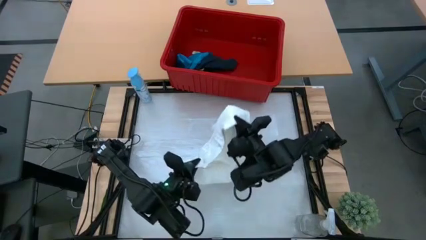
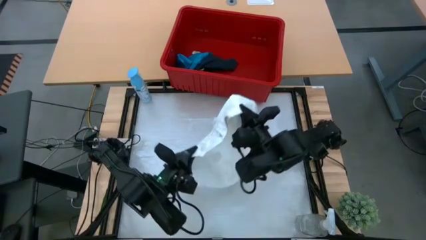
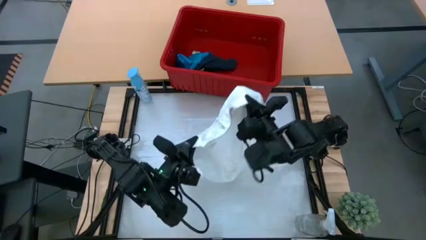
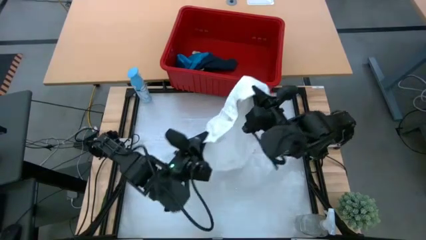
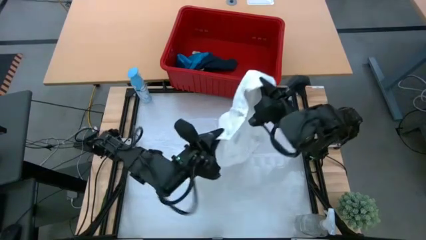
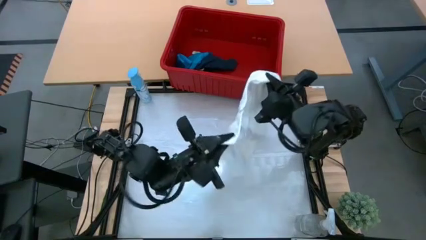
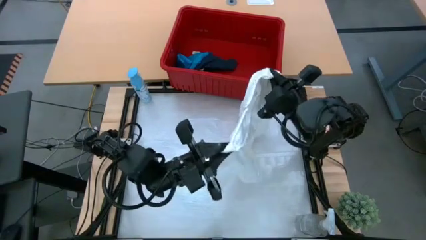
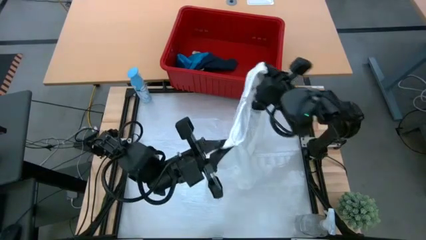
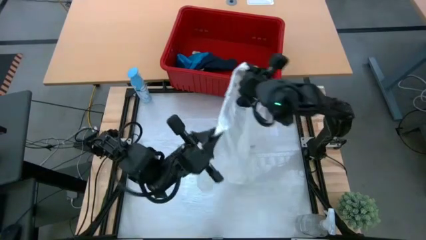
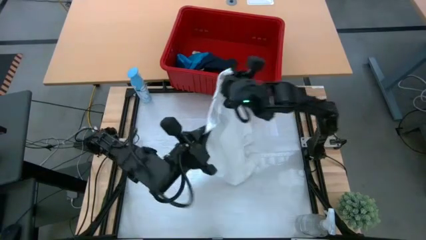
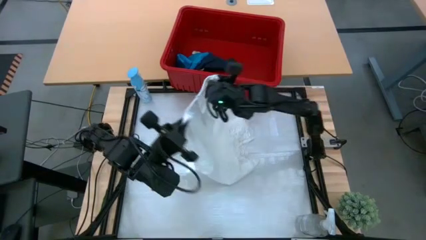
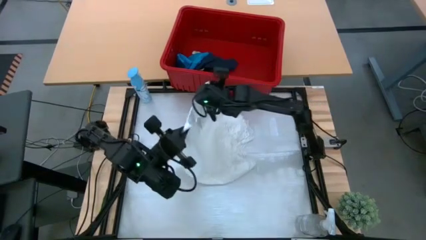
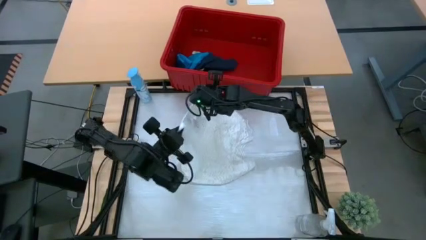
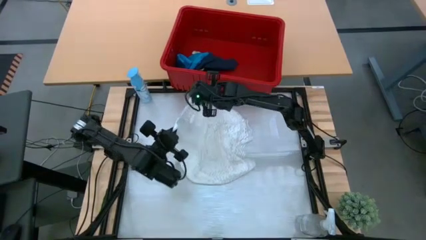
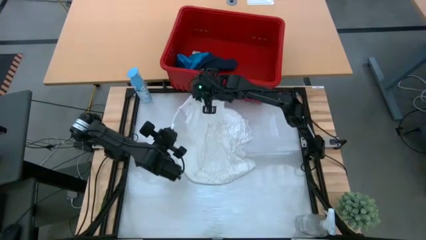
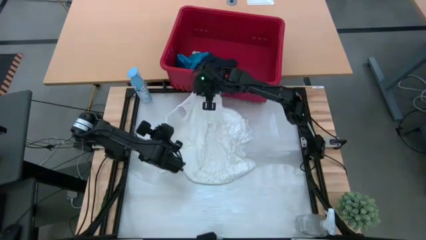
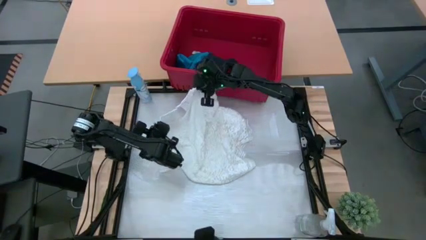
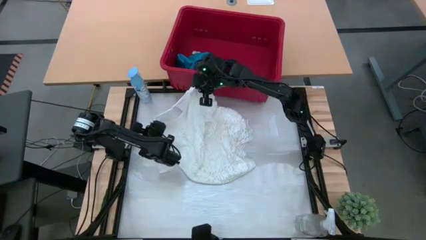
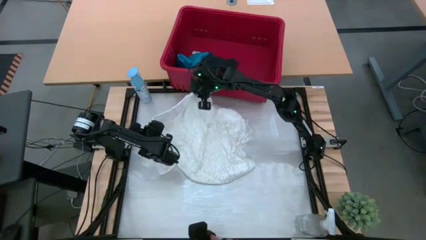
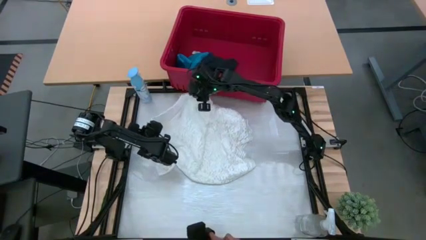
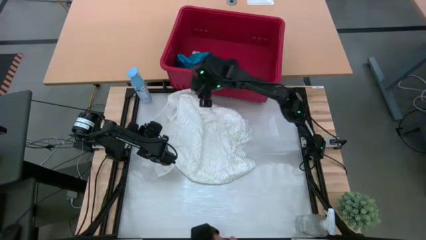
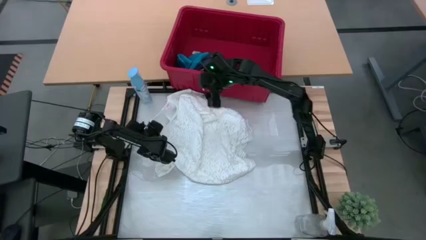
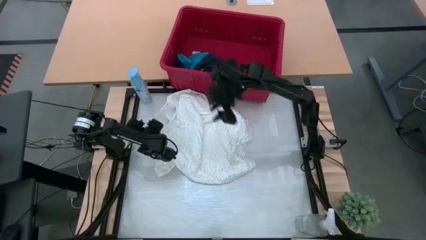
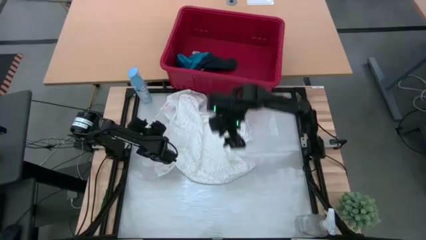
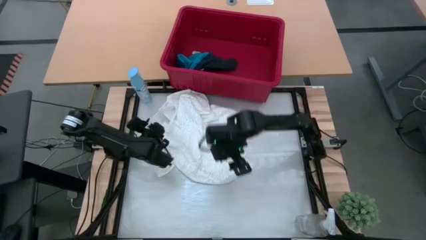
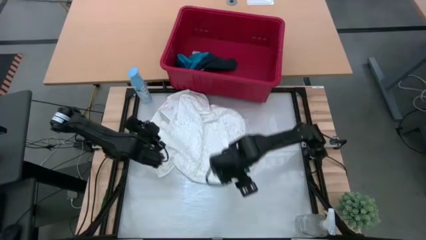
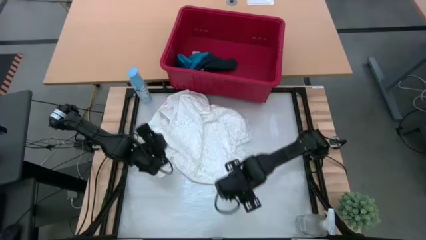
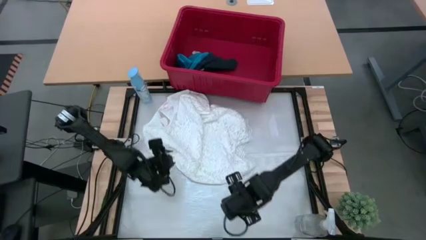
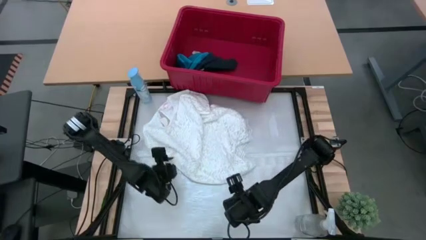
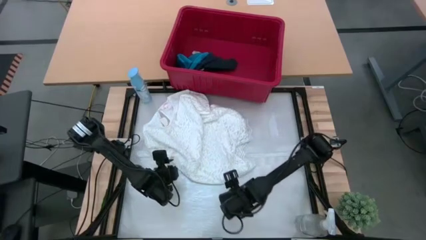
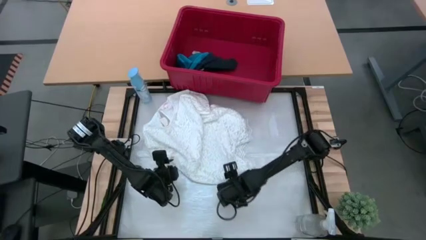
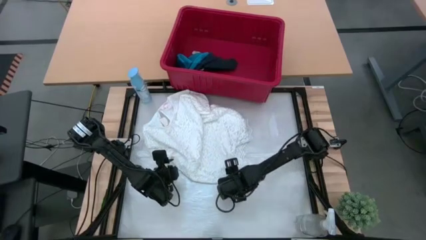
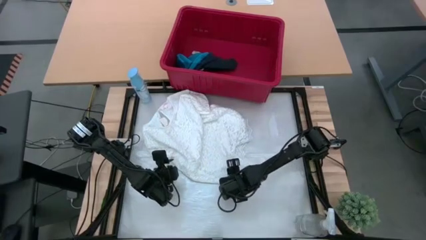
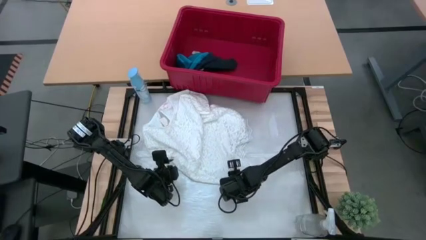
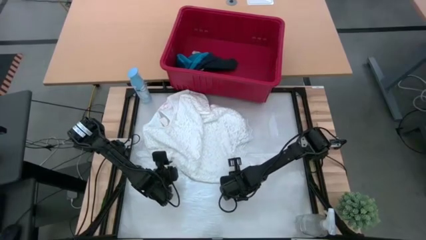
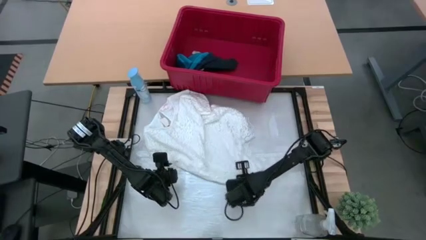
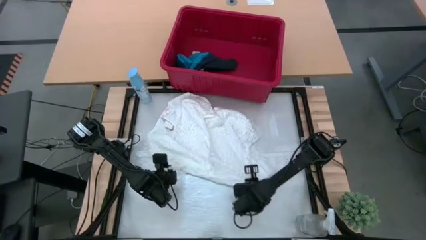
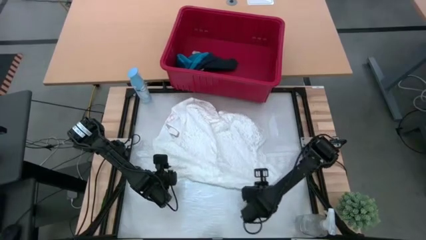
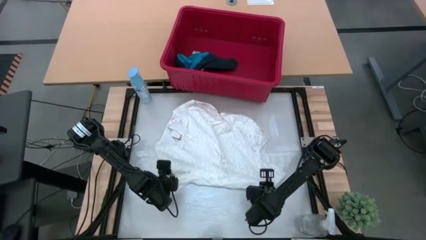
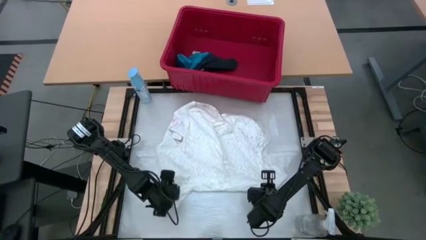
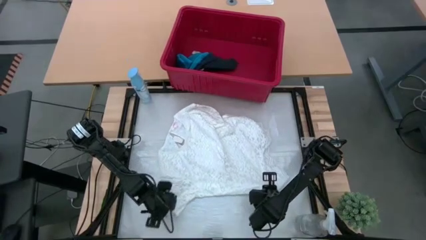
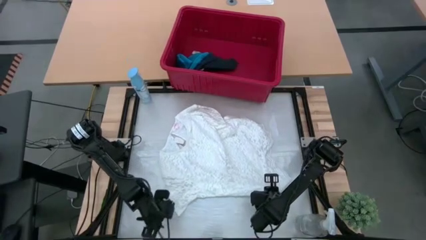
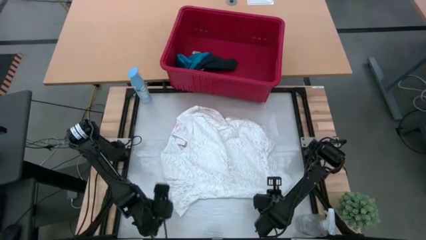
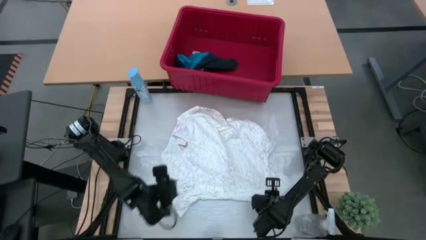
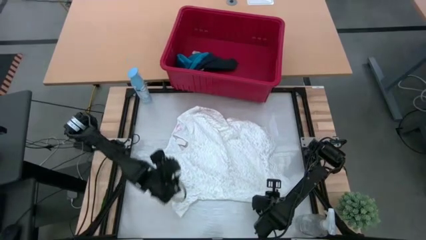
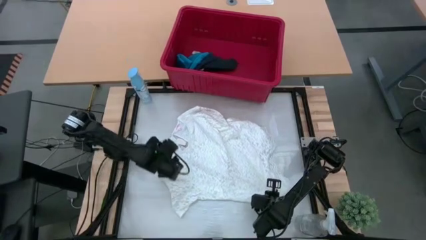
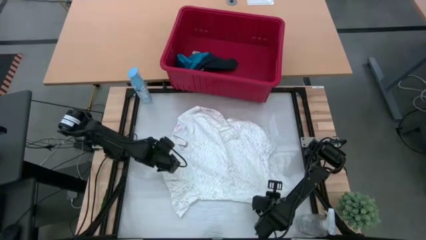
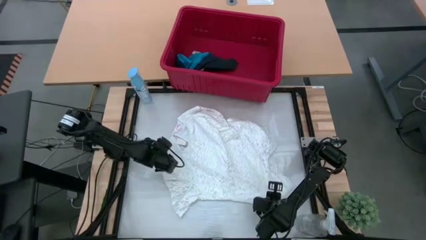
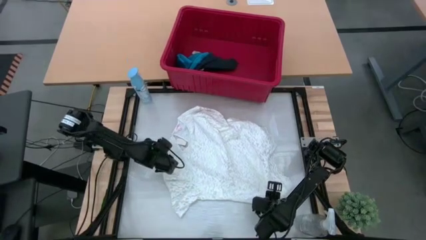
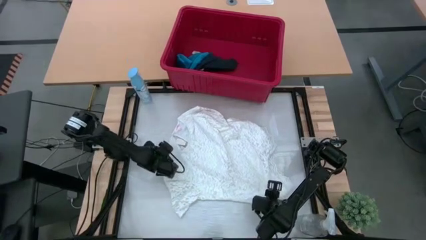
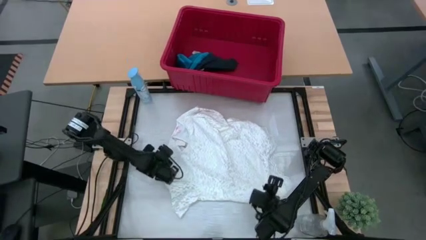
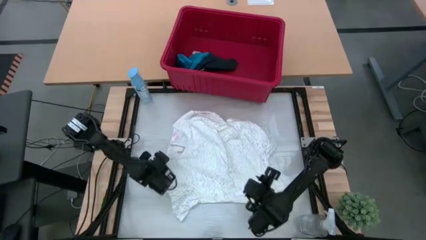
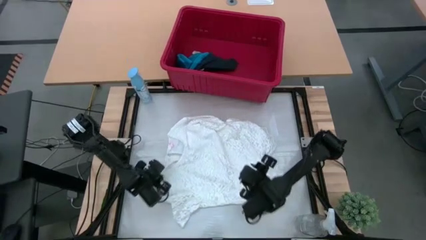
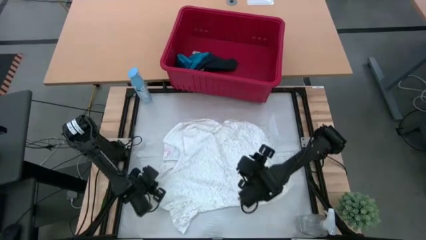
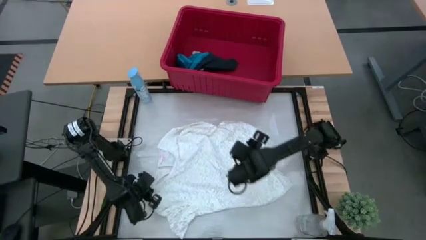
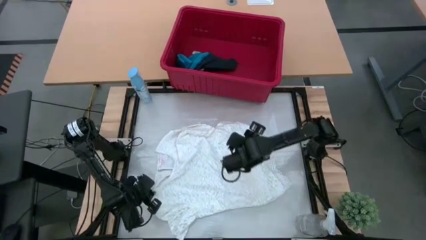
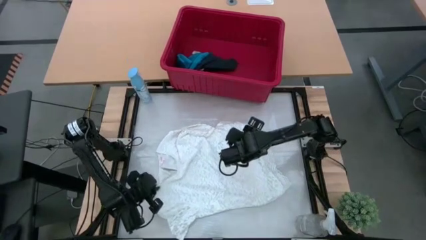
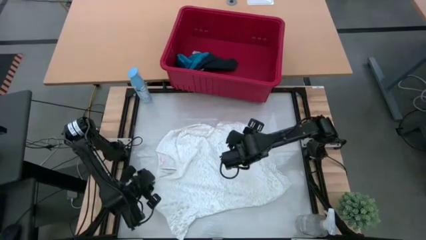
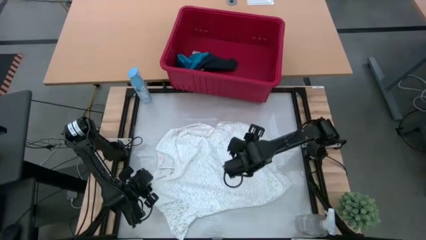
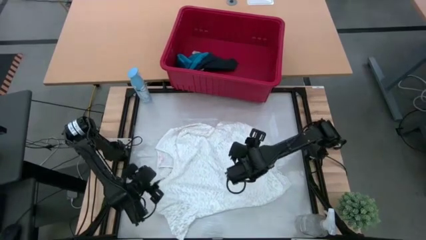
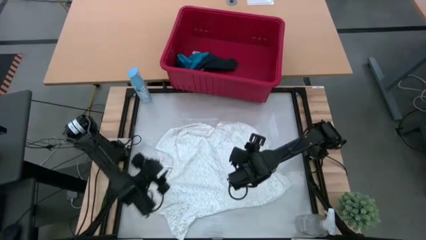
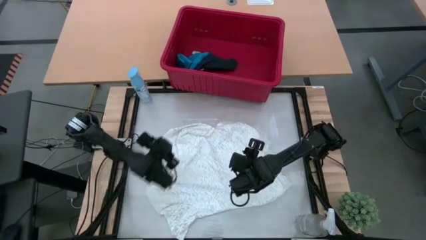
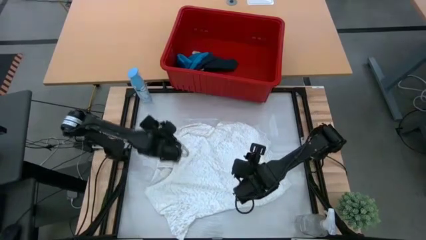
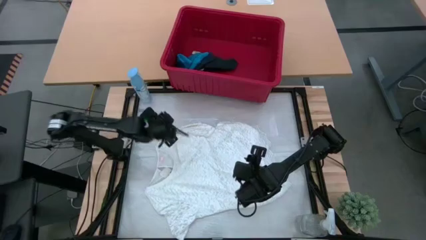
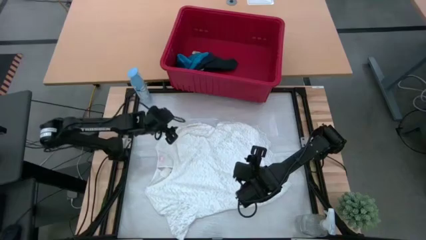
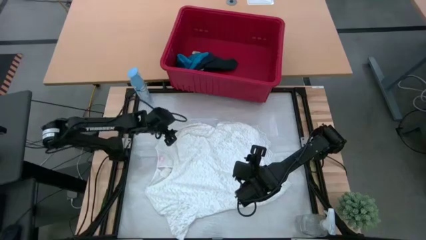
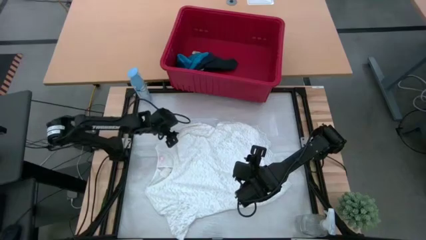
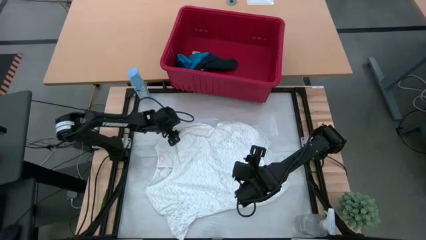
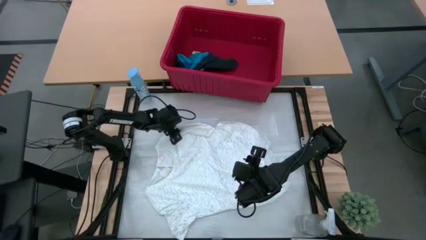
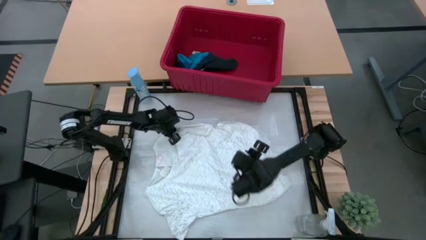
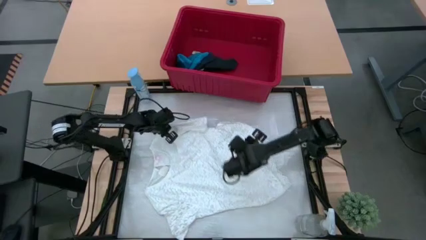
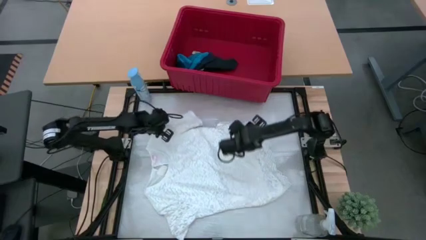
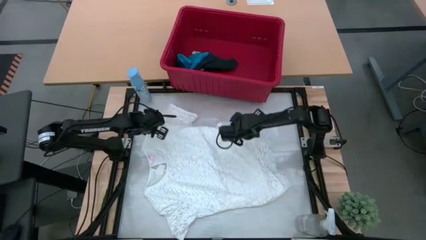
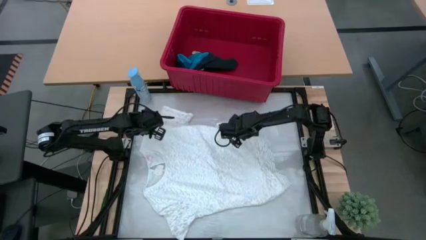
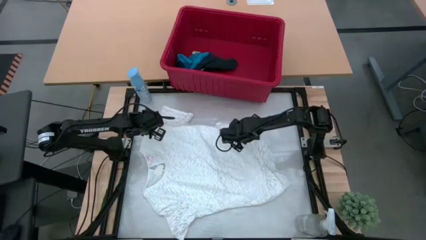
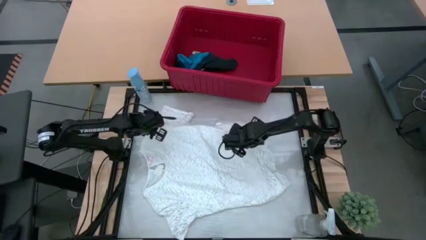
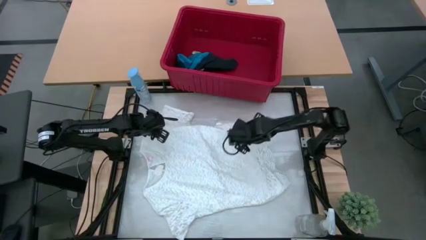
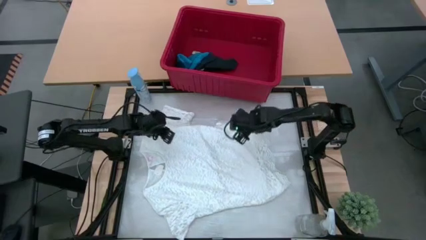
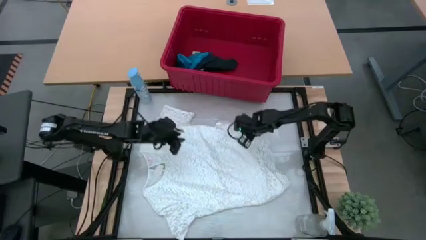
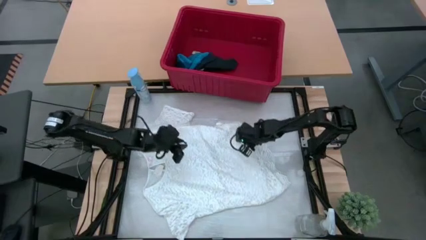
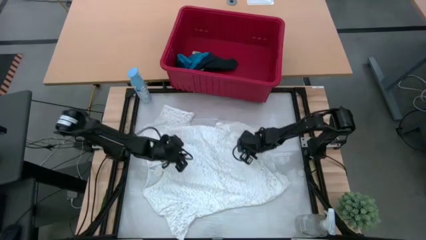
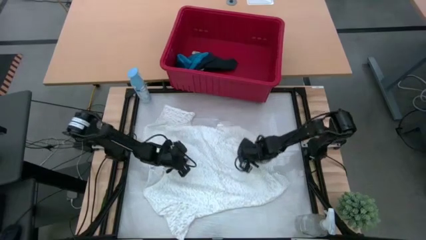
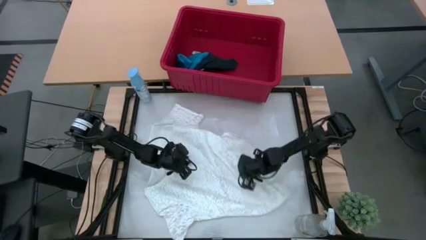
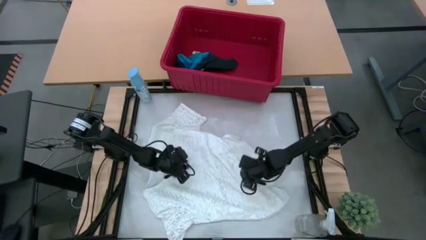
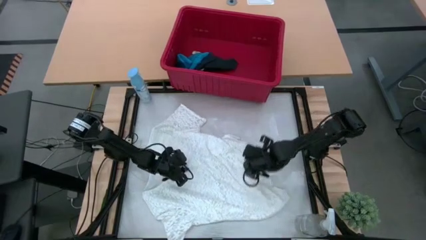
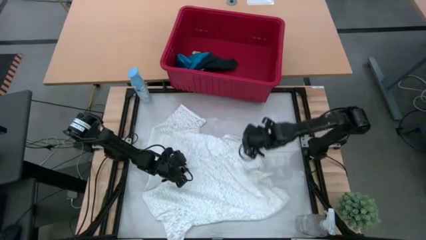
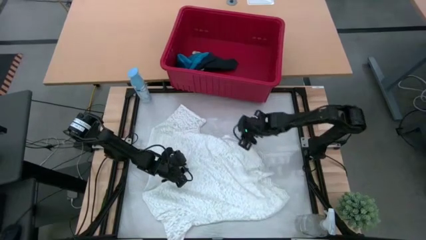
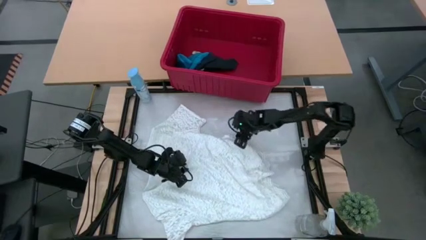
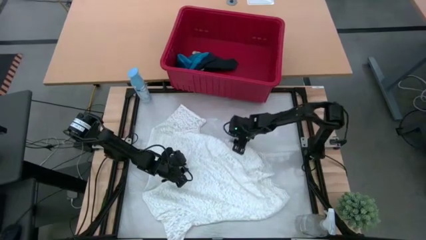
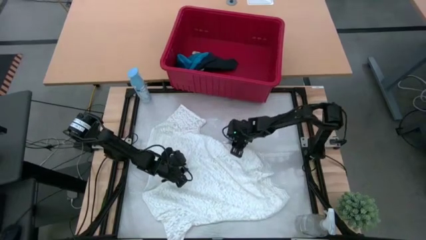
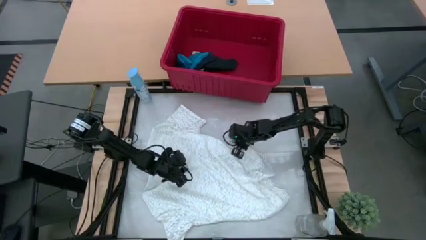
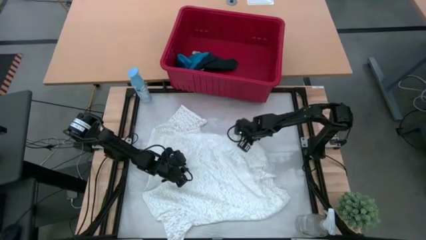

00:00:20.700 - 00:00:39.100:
Task: Fold Laundry from Bin
Fold the white shirt
